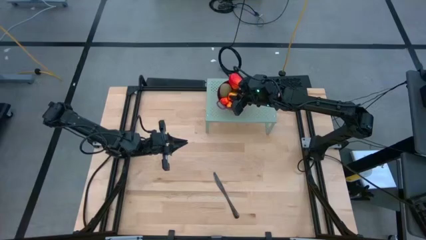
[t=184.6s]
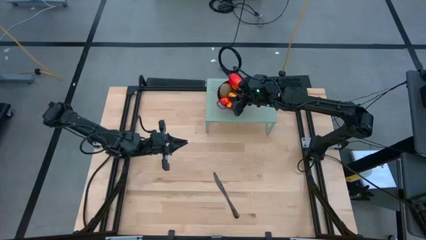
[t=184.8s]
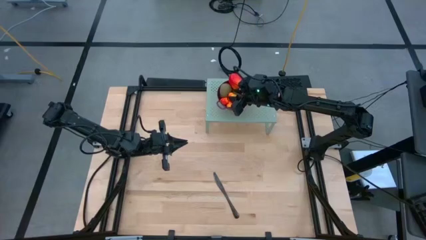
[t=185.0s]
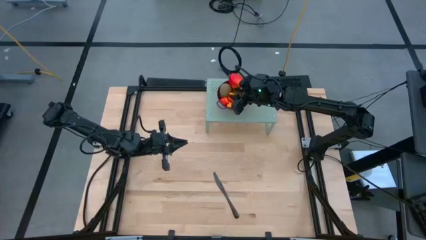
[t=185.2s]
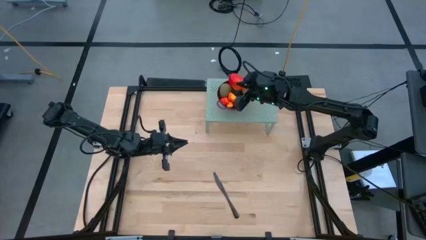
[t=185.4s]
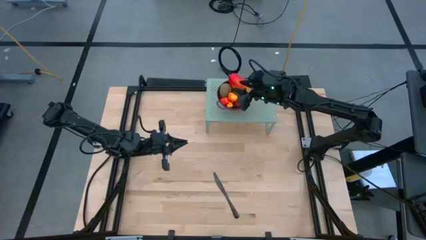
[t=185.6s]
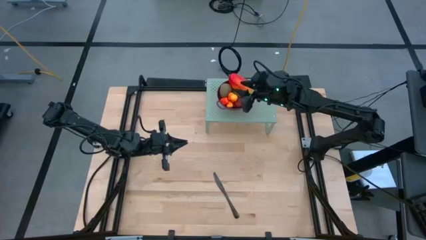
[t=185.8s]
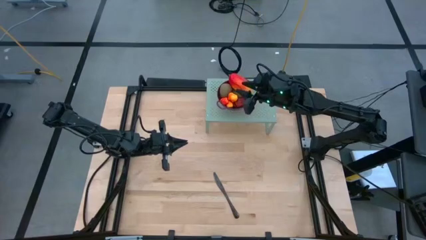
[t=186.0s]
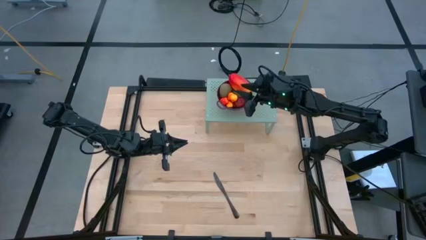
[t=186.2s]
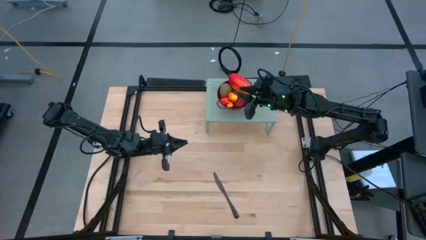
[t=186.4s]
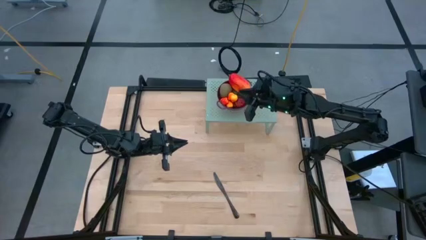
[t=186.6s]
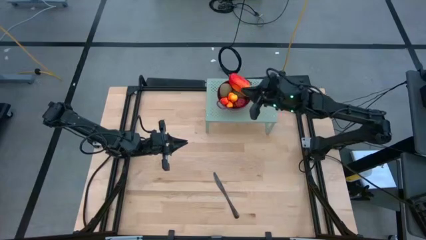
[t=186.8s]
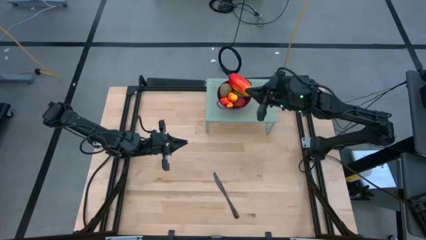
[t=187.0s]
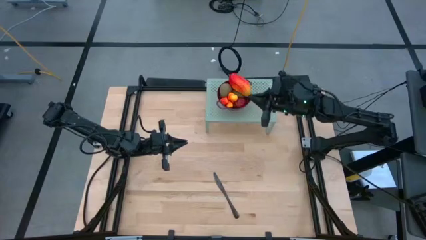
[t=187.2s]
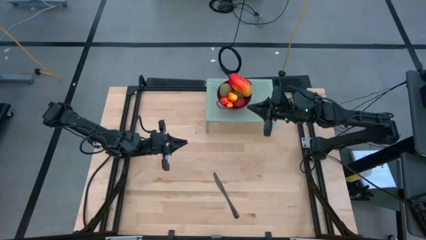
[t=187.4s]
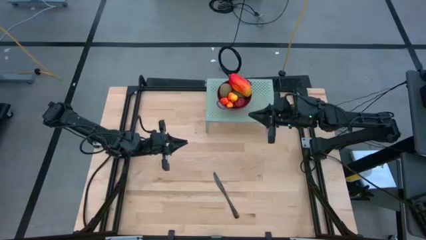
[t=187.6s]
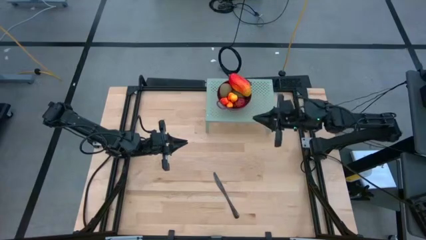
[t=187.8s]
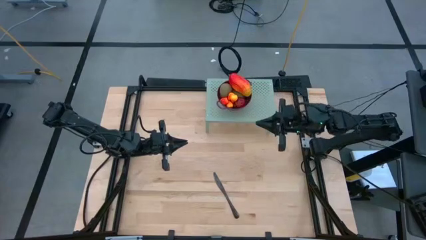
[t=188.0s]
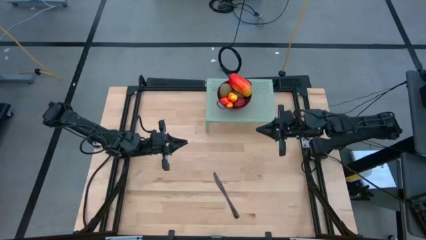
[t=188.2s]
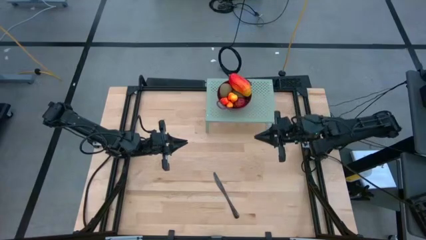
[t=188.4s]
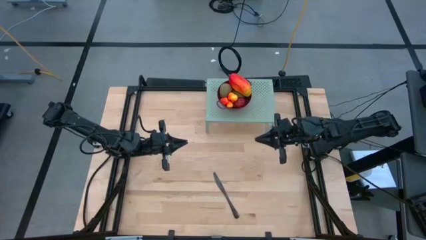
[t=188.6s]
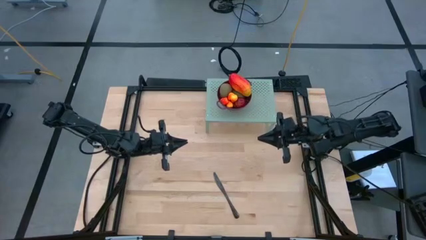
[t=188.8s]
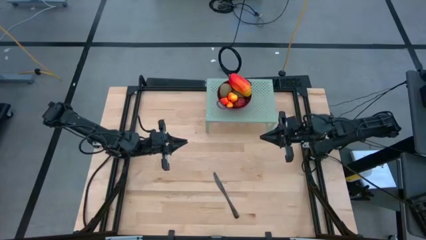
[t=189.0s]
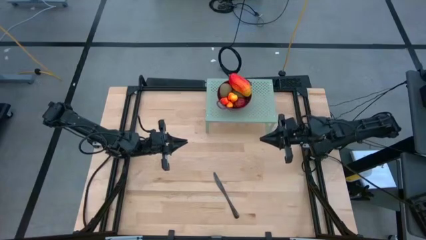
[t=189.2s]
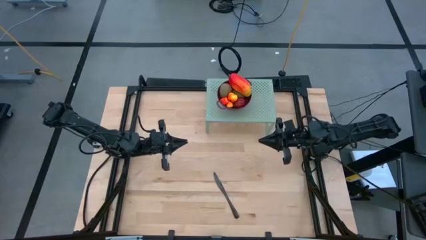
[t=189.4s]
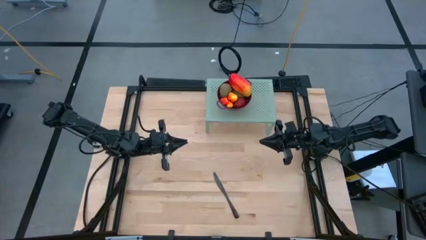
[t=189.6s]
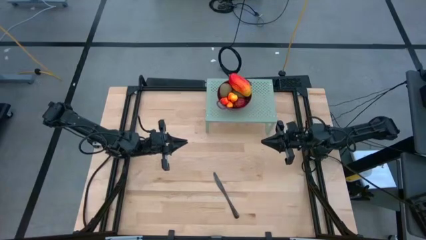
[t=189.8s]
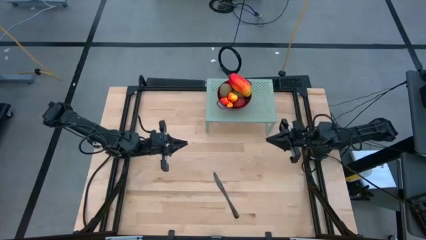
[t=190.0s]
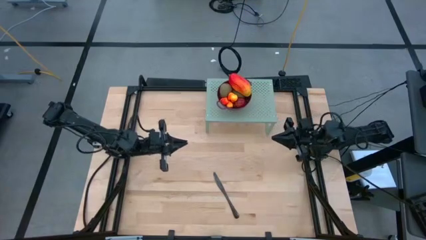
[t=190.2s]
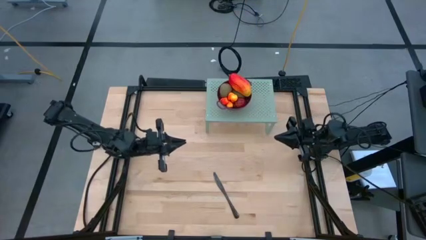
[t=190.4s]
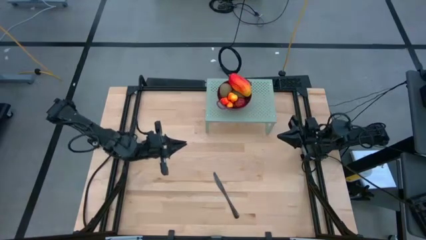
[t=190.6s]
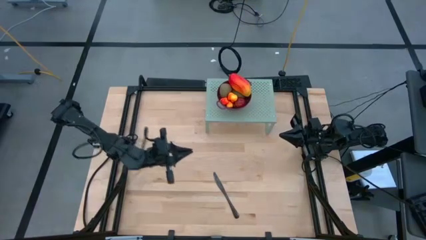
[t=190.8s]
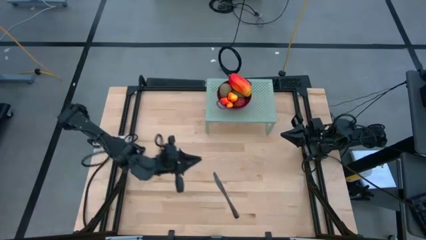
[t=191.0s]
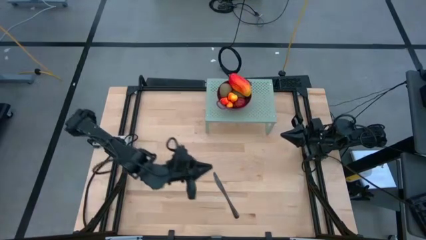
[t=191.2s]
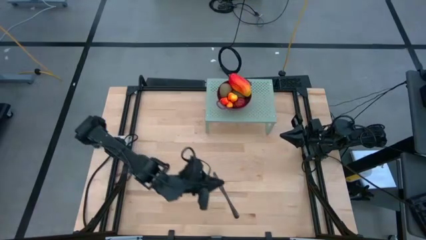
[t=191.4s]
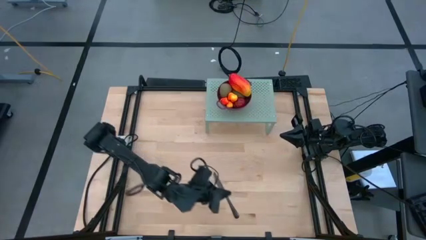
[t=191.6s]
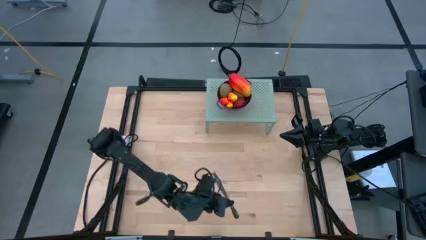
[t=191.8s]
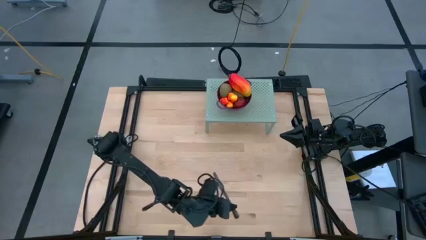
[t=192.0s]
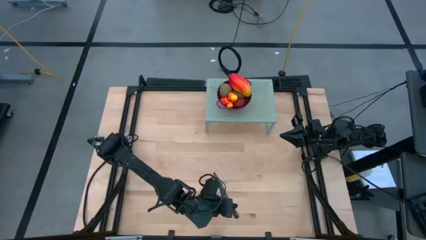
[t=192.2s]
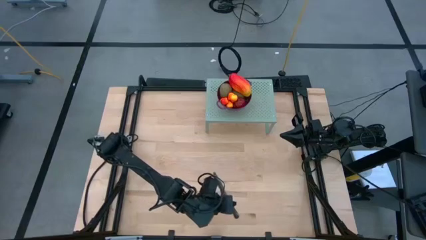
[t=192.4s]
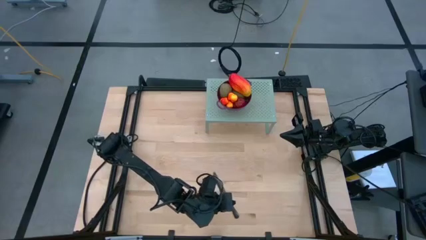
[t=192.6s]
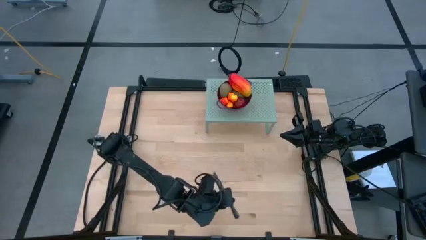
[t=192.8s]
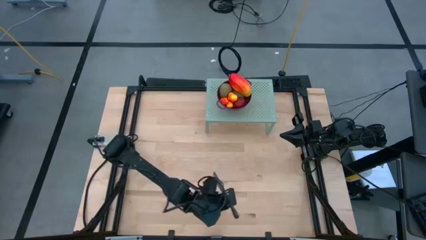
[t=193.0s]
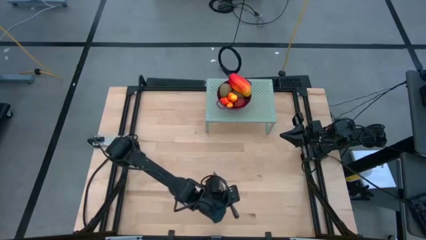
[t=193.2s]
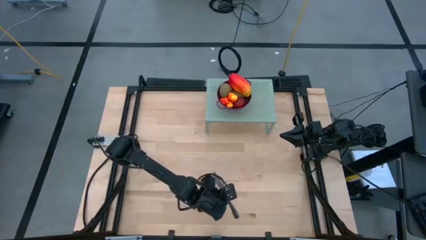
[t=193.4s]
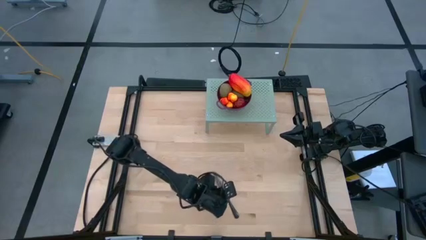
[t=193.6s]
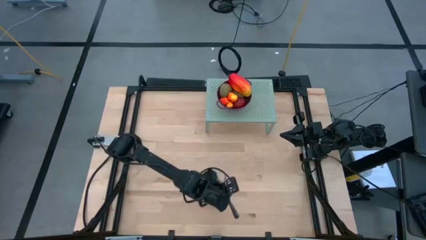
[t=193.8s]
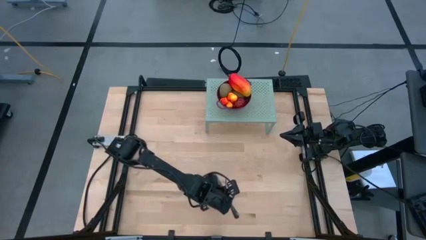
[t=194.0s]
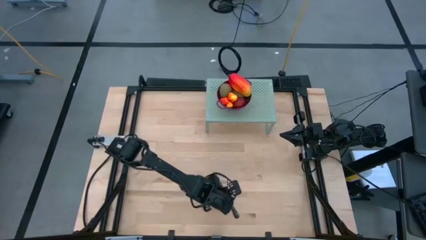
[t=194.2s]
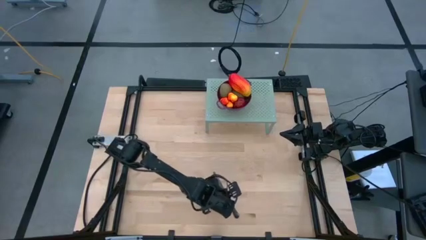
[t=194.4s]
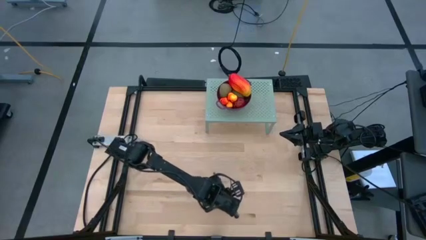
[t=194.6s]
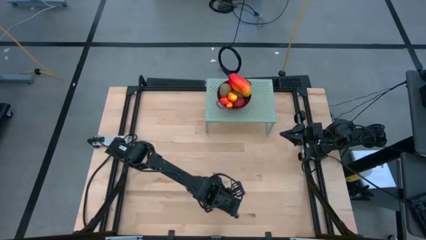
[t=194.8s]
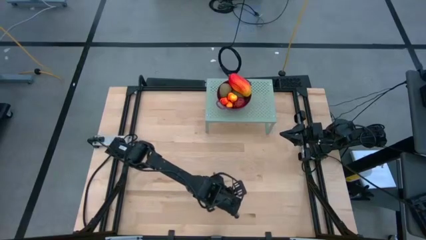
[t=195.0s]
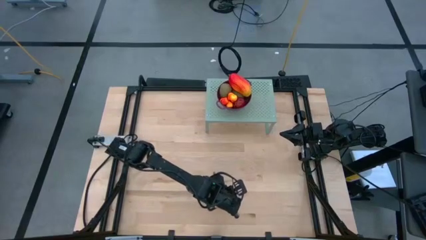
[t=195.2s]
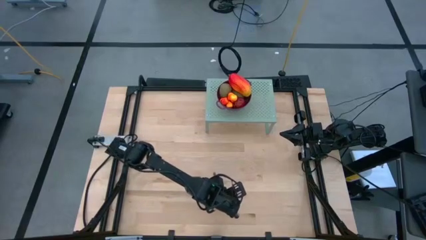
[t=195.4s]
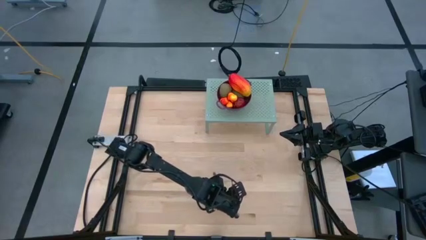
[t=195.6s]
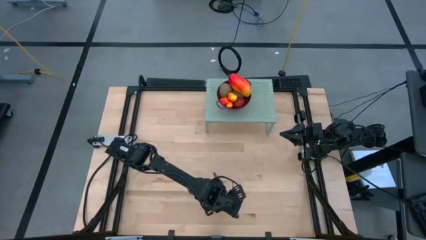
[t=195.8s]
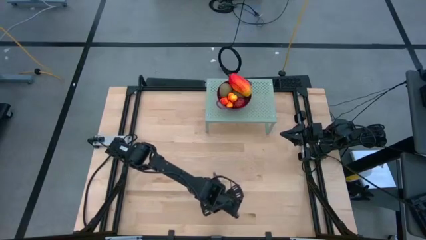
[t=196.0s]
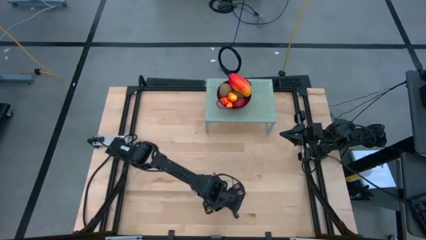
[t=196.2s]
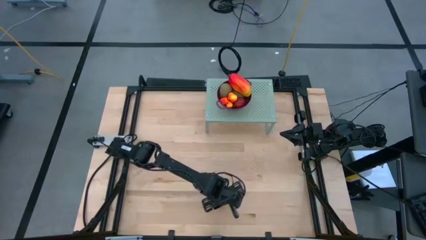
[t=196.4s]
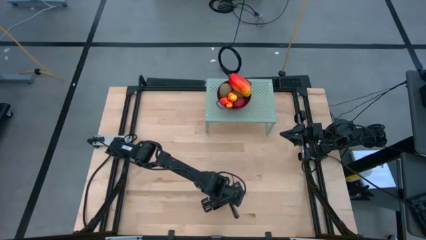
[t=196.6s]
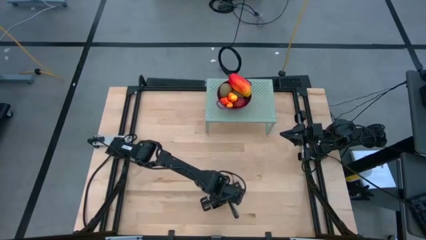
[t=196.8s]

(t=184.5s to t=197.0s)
Task: Pick & Place Fruit
Put the knife on the shelf

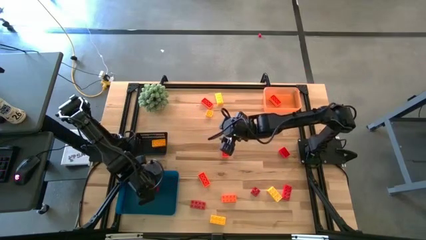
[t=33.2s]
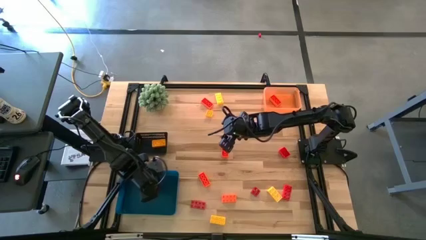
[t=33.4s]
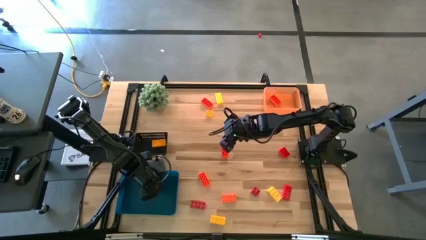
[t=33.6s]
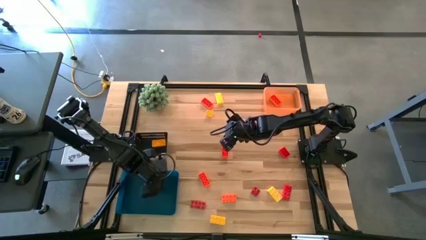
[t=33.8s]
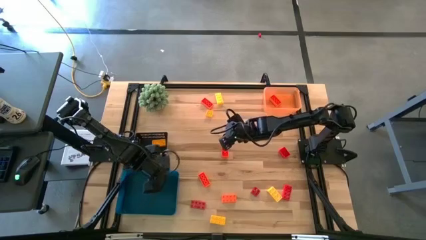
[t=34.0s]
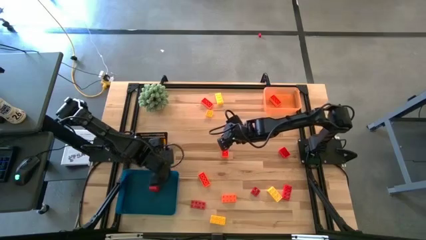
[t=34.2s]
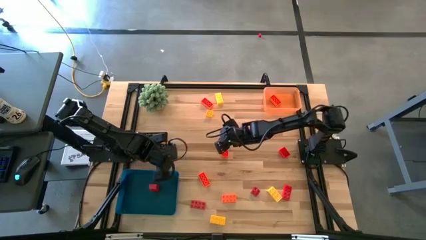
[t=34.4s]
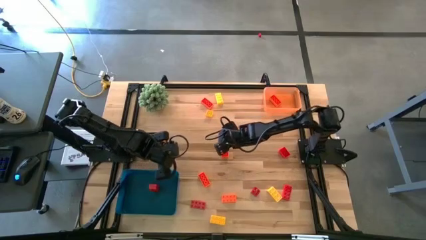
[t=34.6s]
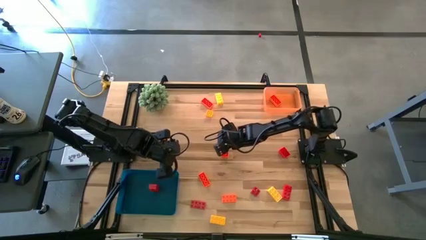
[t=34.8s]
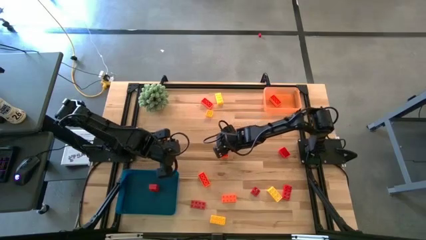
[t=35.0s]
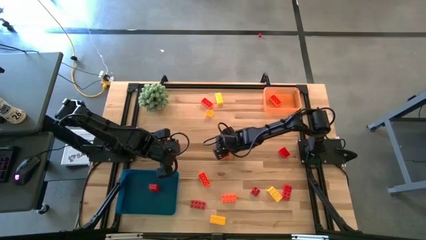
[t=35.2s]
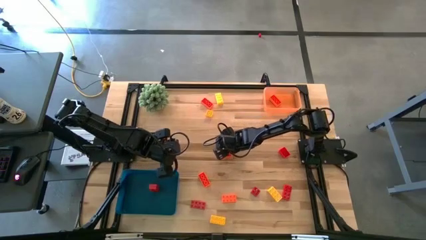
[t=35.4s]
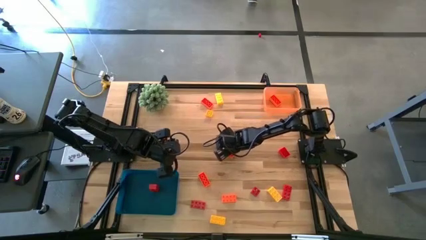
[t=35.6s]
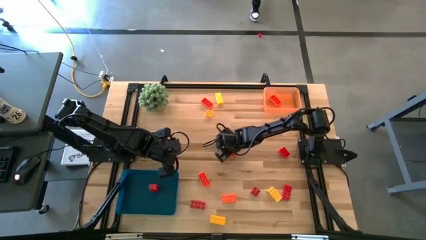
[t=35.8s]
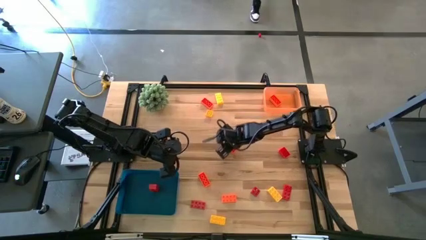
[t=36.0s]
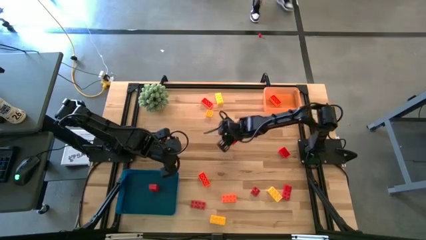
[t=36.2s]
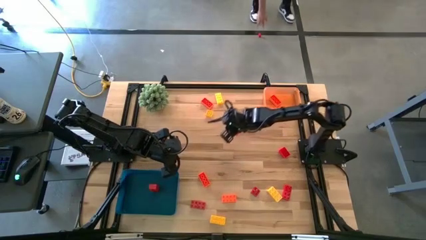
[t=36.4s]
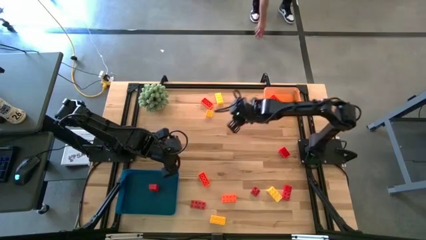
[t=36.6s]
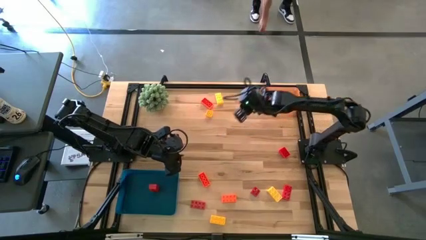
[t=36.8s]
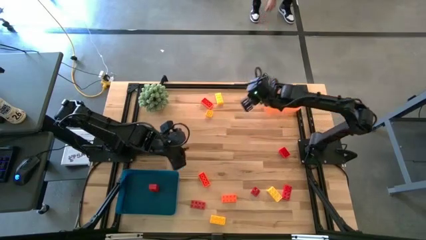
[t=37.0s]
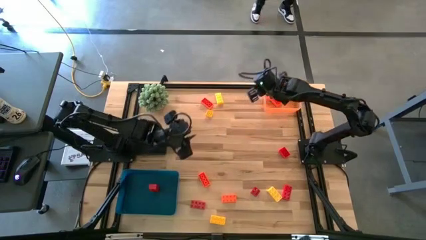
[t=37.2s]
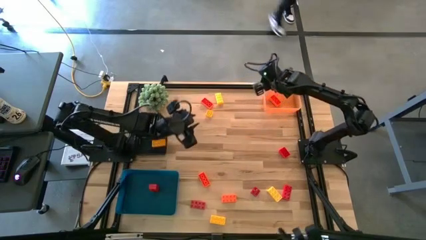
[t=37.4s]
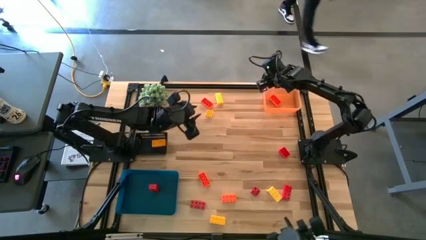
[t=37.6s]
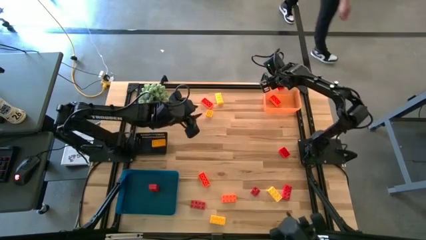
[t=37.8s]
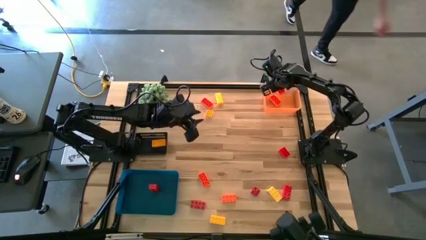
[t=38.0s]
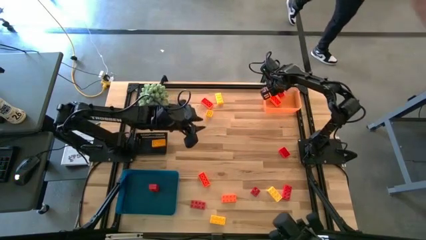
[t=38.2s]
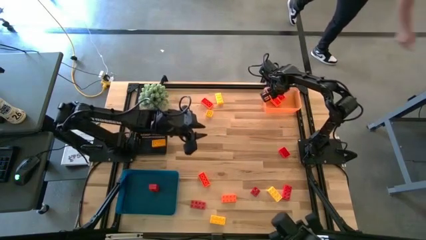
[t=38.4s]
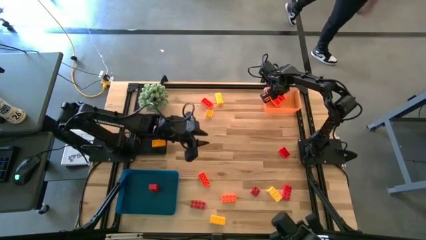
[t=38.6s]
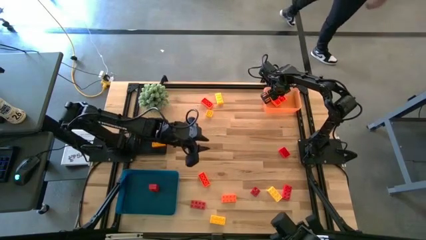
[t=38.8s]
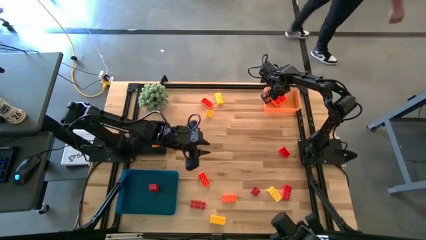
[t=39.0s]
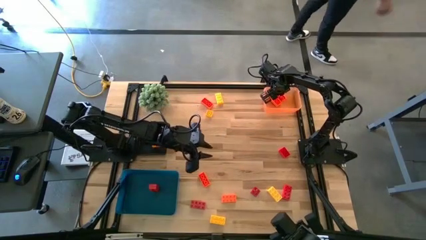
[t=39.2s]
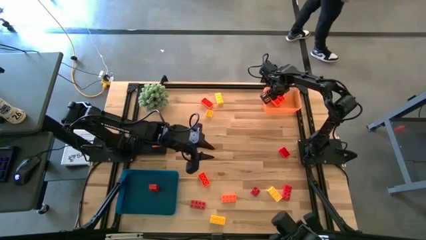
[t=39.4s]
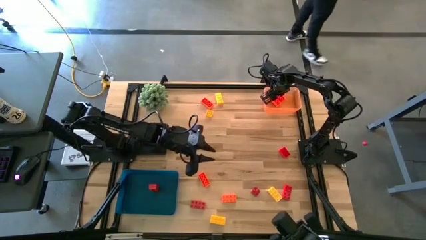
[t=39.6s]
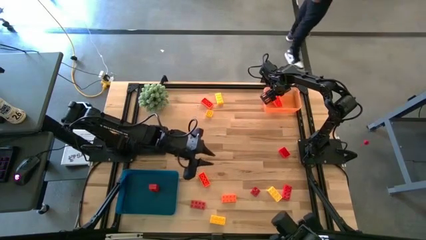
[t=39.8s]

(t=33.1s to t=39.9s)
Task: Sort & place blocks by color
Put the orange game piece into the orange bin
